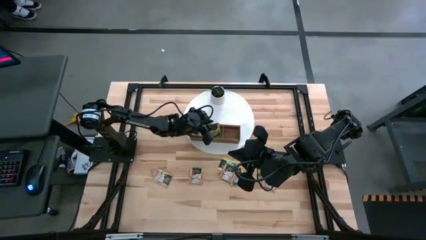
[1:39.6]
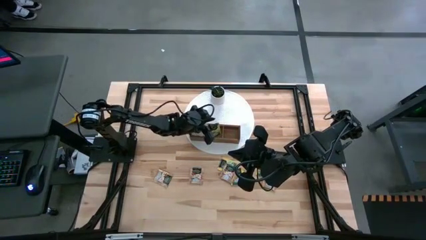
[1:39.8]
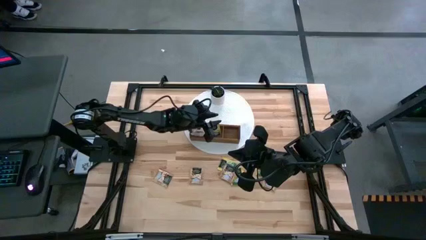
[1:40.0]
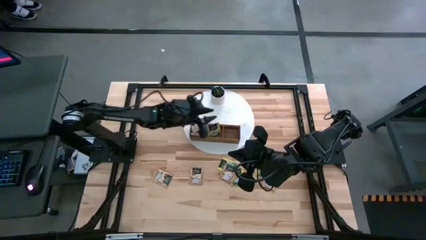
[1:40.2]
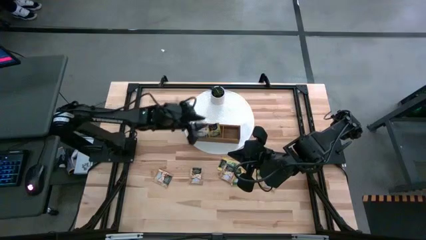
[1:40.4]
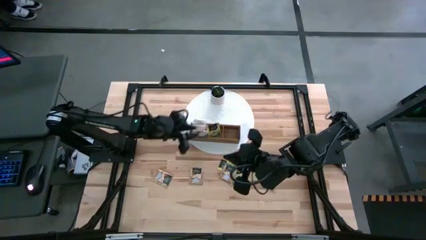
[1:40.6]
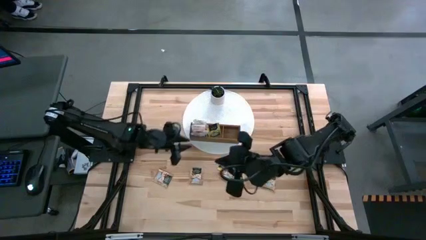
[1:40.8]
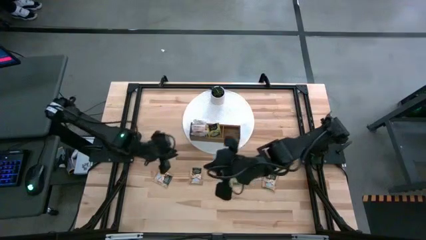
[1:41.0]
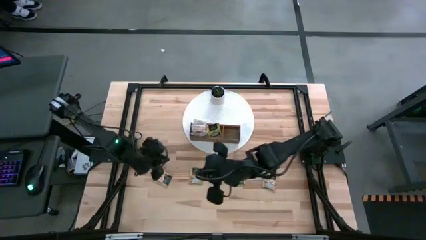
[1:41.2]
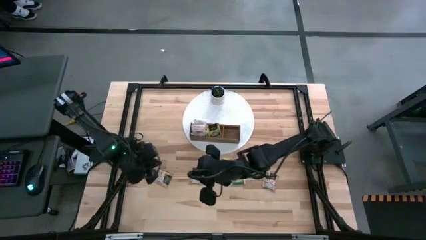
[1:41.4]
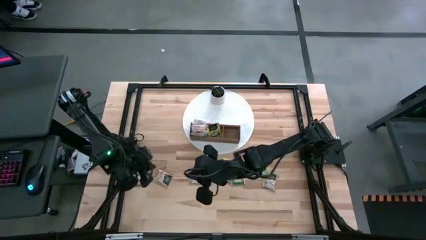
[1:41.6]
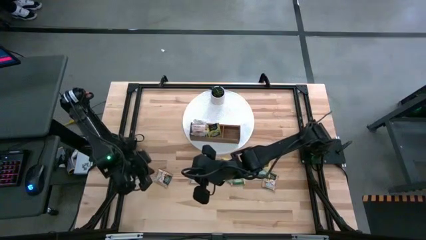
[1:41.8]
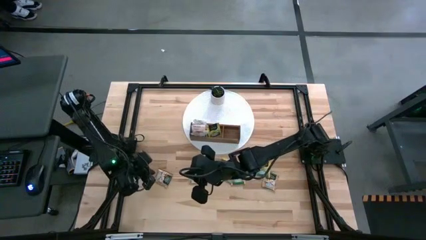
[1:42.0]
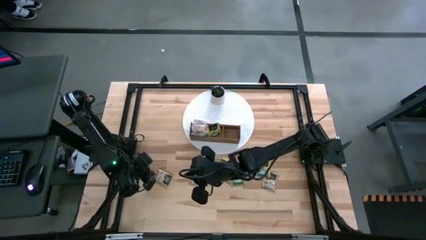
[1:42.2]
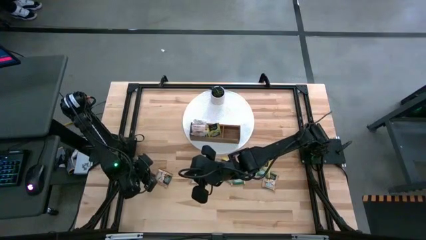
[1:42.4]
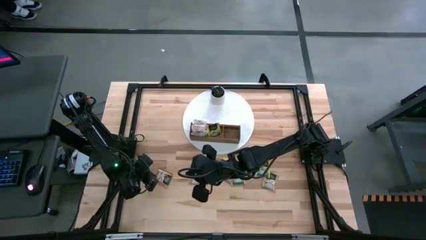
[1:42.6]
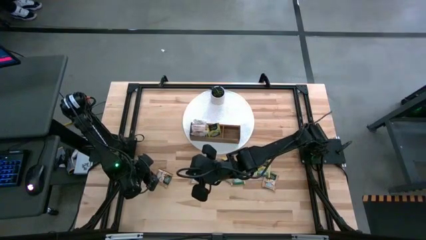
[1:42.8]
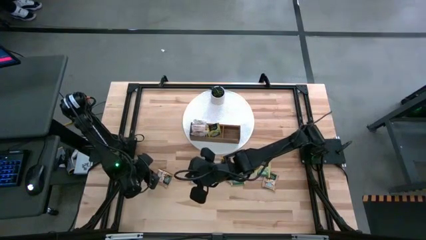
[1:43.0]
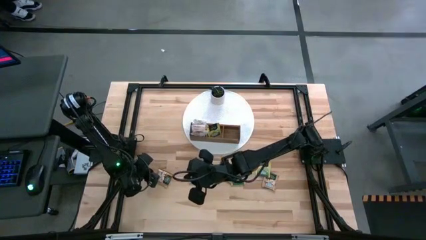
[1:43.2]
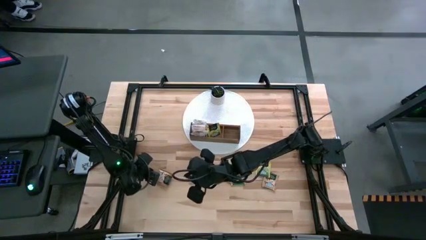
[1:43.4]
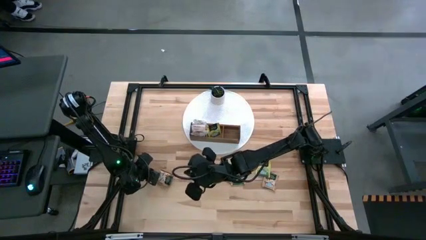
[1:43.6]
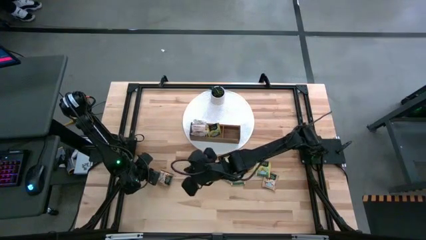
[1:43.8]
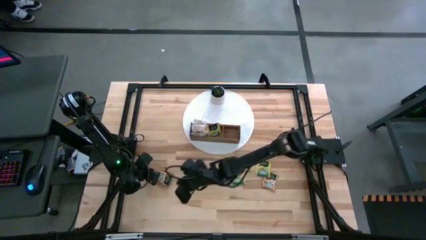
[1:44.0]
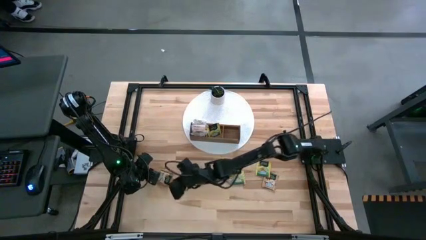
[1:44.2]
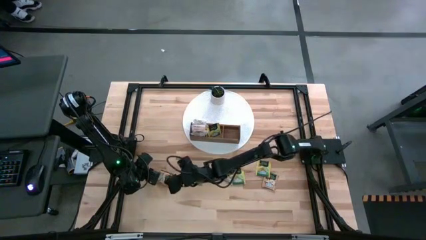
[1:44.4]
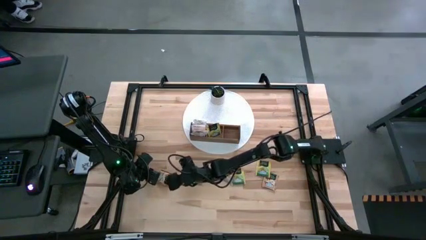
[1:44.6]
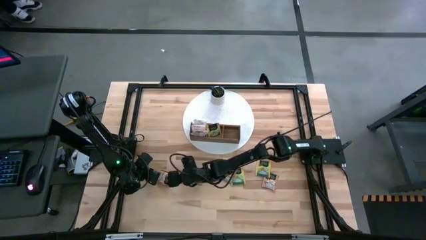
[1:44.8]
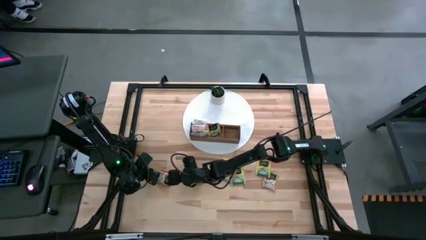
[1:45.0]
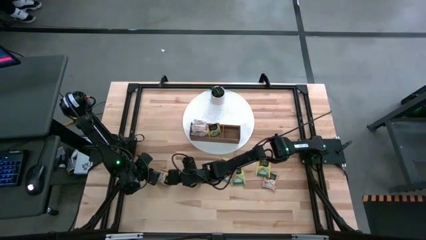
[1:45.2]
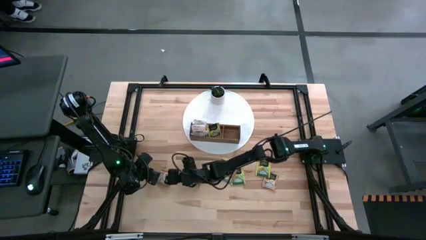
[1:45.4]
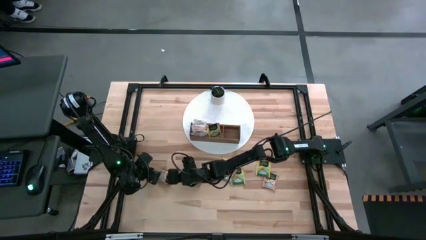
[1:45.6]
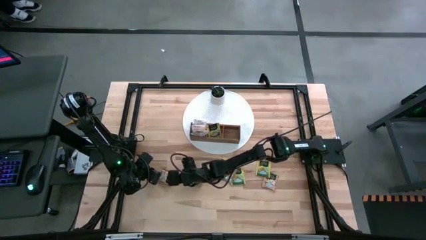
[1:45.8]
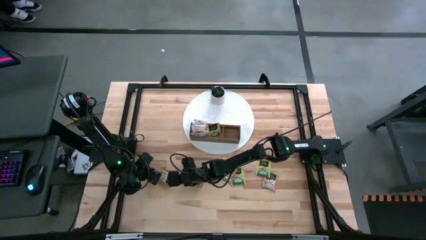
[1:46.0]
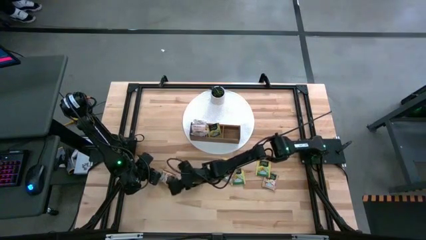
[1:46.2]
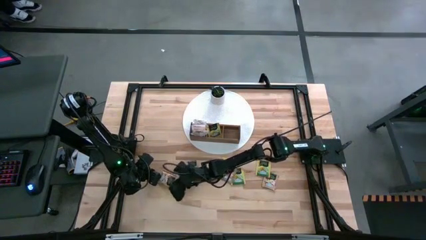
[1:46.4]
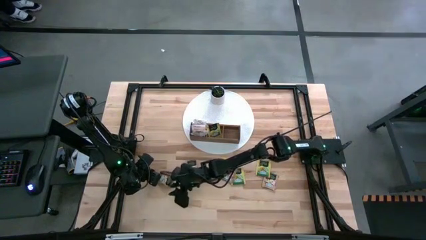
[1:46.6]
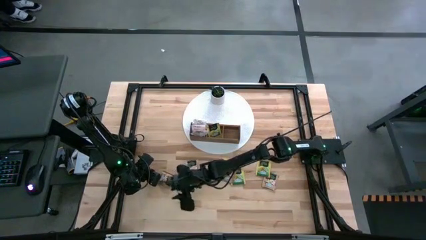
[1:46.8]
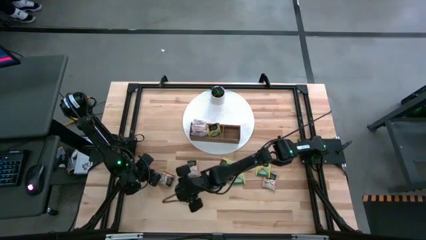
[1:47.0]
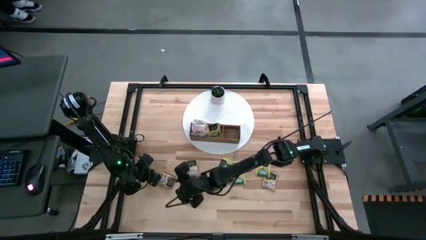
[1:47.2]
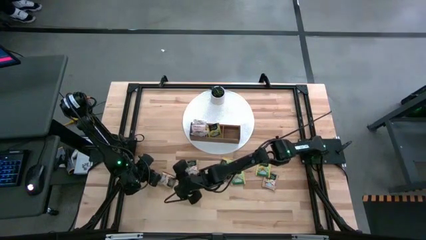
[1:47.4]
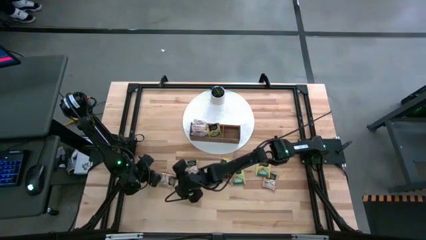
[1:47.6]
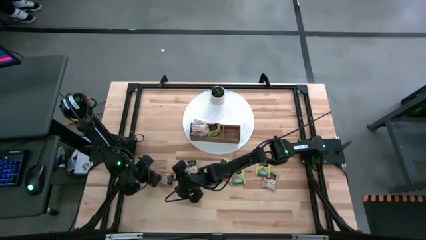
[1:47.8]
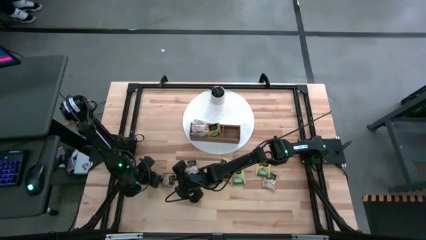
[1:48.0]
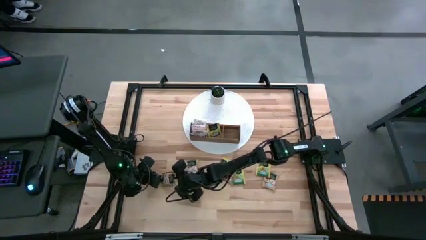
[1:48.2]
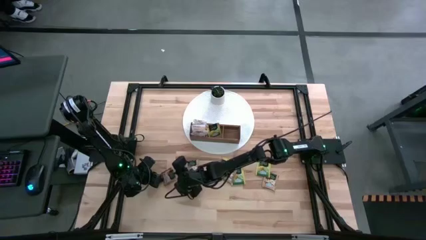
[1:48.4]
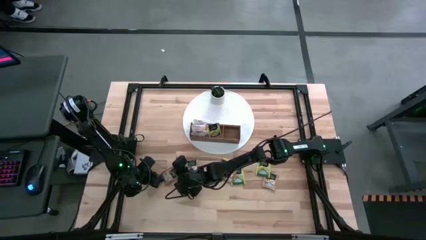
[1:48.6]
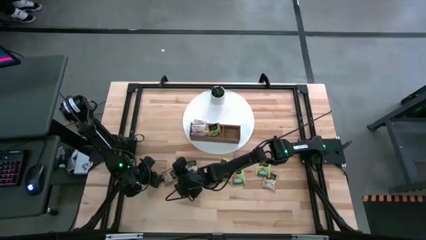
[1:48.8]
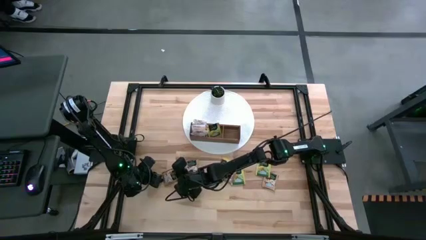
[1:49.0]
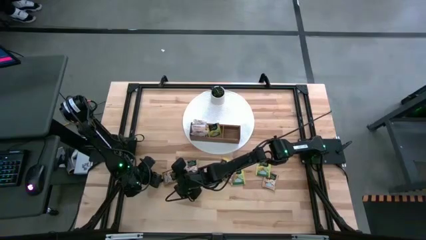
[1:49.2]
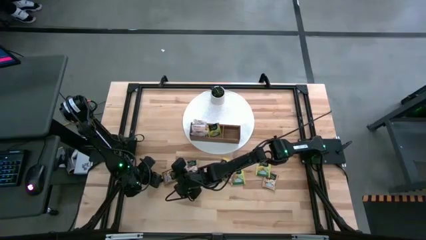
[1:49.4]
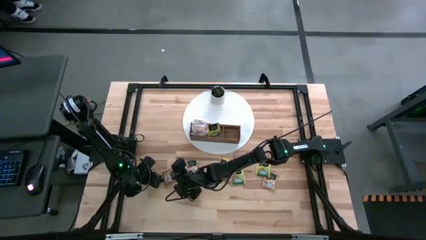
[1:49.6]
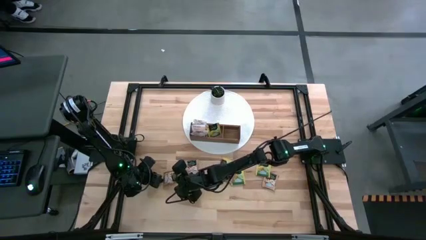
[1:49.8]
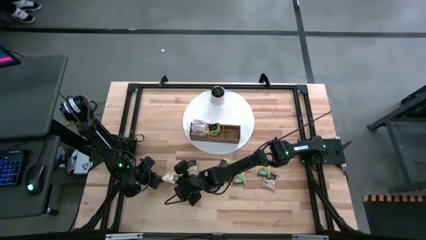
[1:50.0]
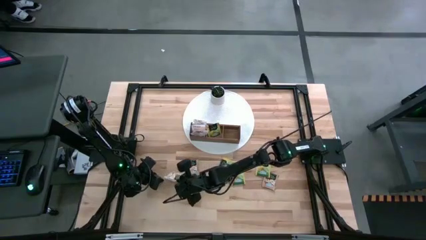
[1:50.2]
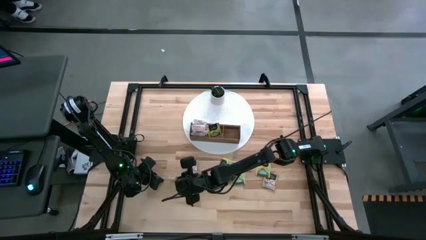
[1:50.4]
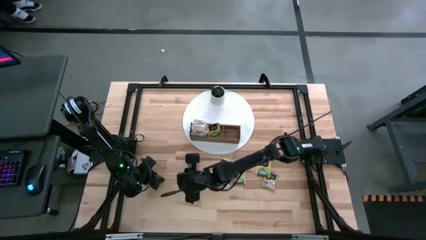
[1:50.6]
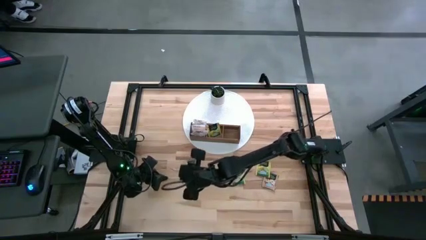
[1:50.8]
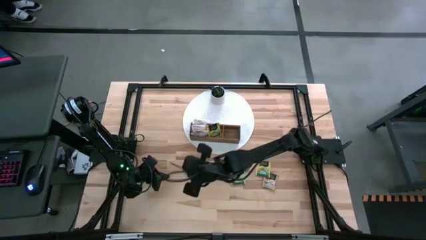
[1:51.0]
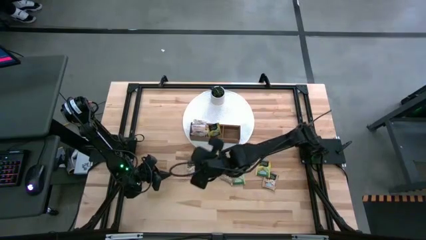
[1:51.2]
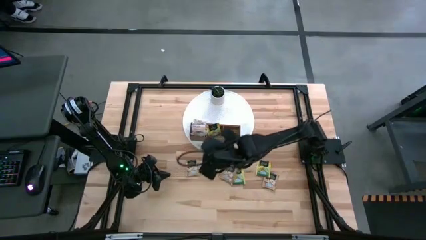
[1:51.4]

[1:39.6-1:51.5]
Task: Pick & Place Tea
Put the brown tea bag into the right section of the wooden organizer

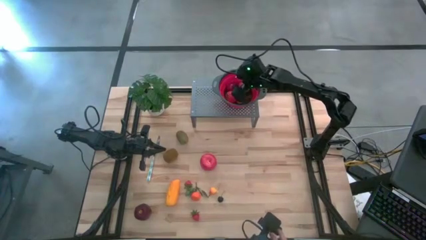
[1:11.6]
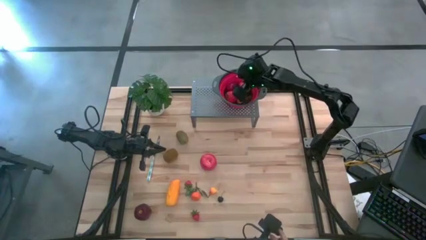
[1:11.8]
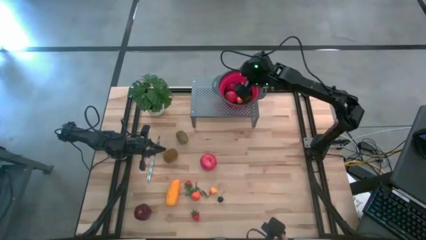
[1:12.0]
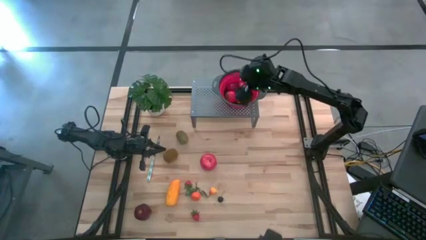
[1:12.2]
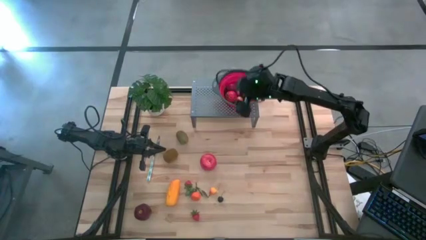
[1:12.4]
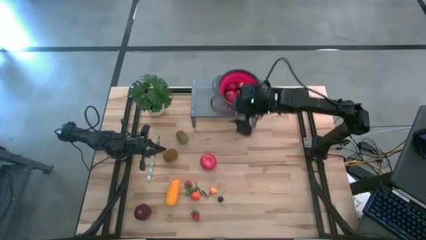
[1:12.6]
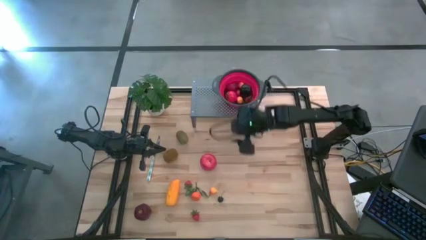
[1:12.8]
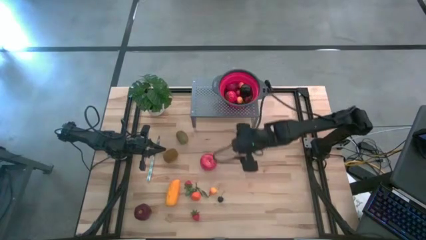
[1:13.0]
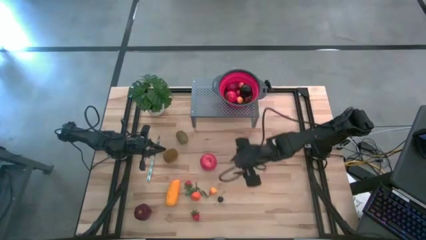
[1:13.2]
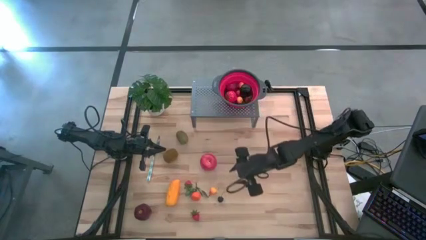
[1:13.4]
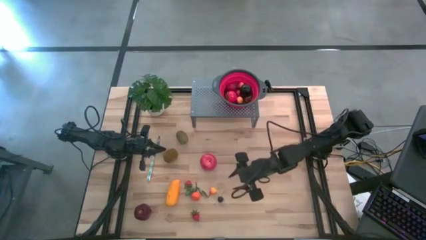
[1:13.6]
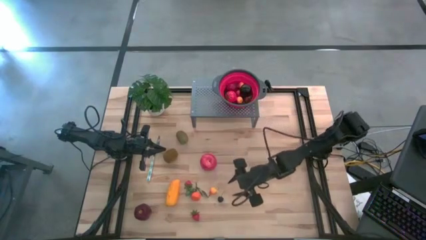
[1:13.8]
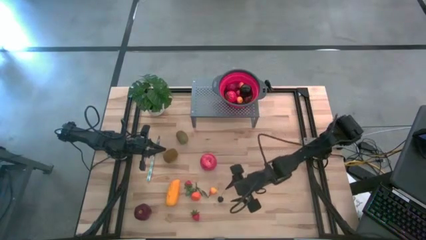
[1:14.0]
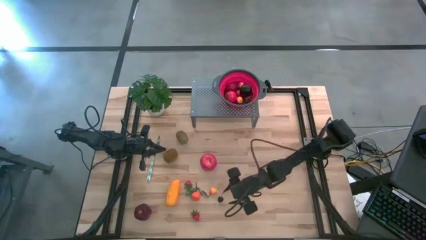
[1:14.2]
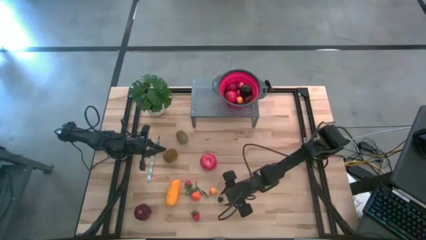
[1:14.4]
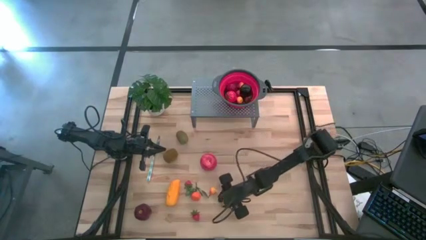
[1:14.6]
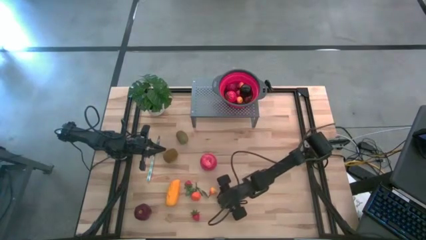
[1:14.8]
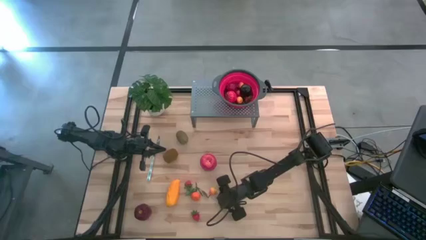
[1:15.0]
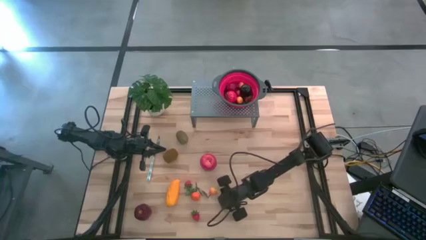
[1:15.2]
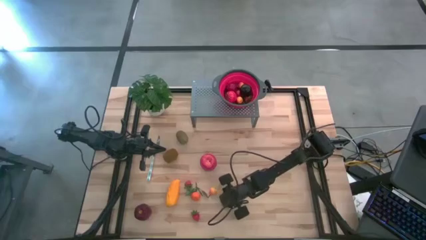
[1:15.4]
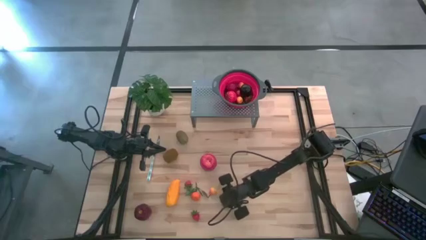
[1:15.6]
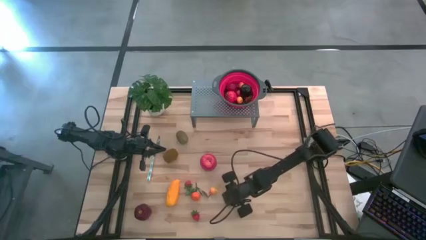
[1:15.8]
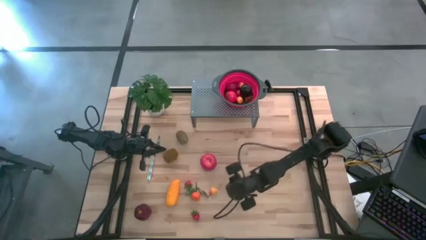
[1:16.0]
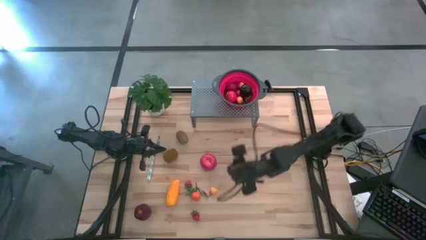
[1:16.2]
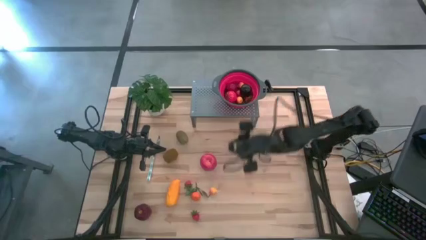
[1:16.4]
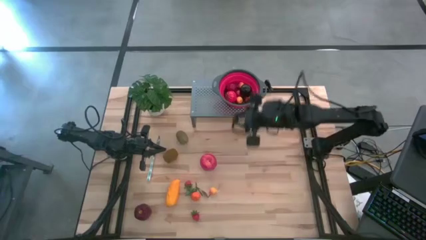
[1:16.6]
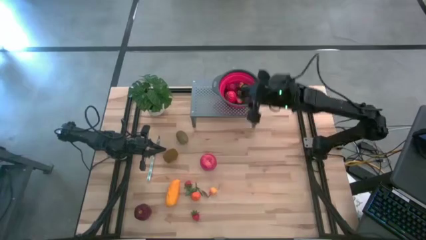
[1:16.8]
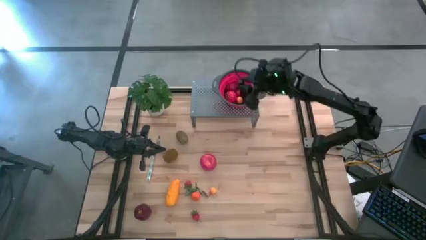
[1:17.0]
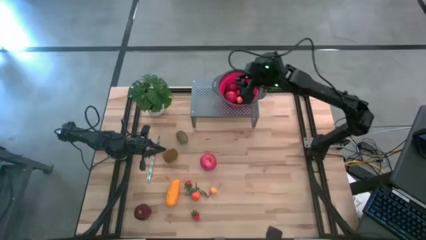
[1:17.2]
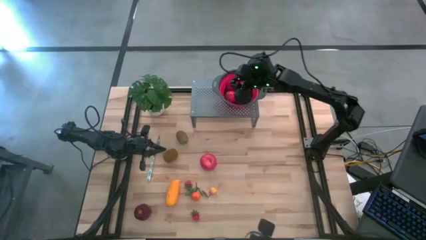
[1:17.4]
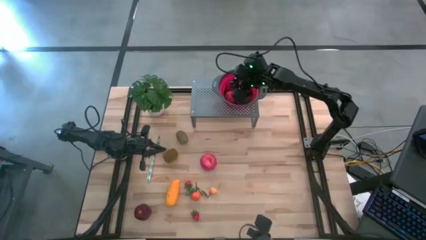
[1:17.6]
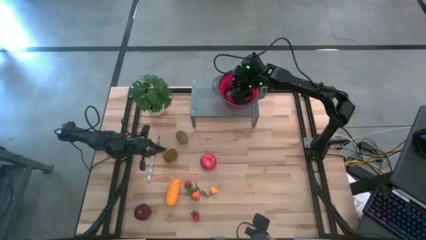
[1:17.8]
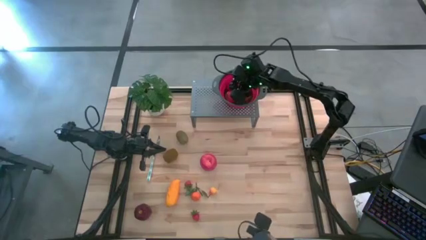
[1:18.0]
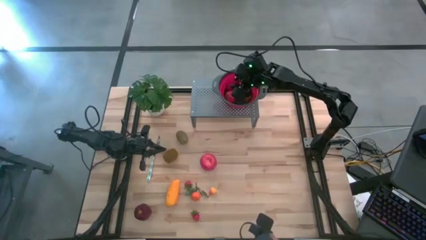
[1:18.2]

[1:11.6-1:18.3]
Task: Pick & Place Fruit
Put the black cherry into the strainer bowl on the shelf
